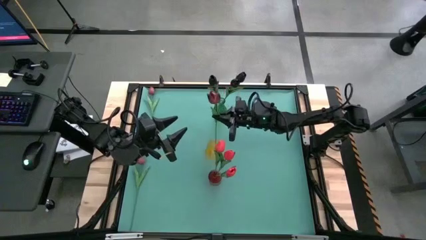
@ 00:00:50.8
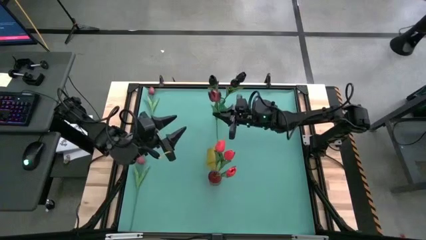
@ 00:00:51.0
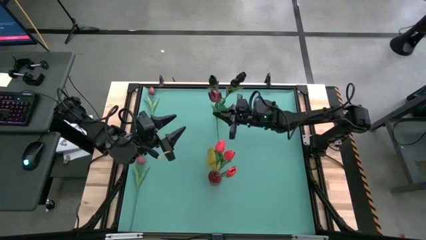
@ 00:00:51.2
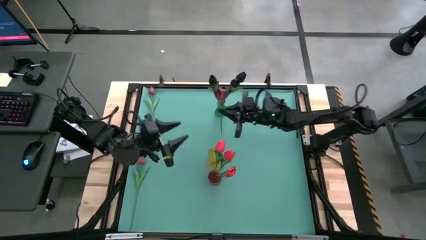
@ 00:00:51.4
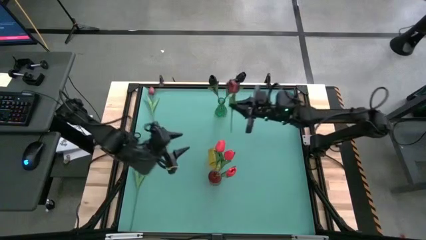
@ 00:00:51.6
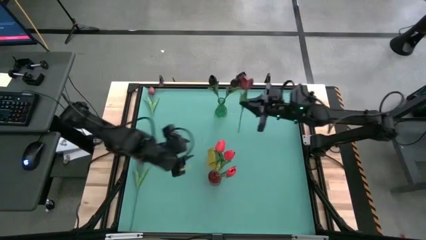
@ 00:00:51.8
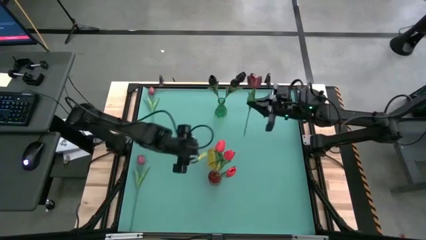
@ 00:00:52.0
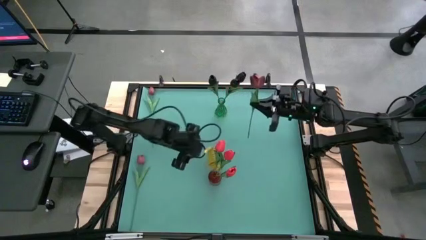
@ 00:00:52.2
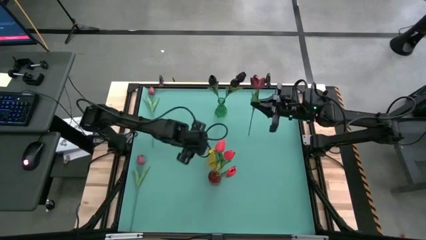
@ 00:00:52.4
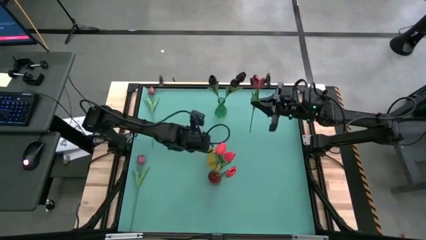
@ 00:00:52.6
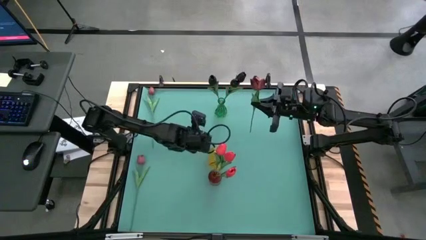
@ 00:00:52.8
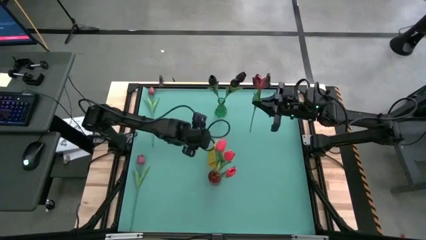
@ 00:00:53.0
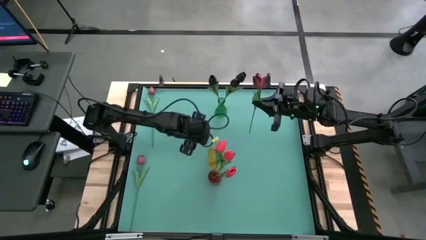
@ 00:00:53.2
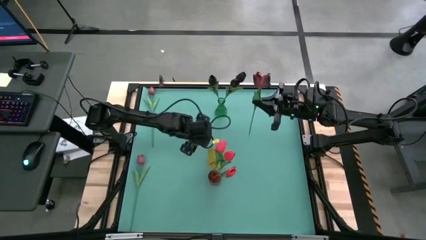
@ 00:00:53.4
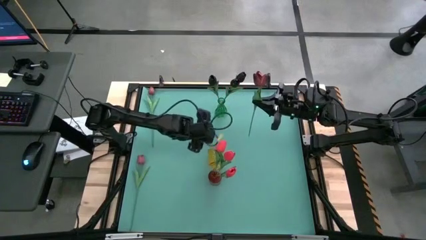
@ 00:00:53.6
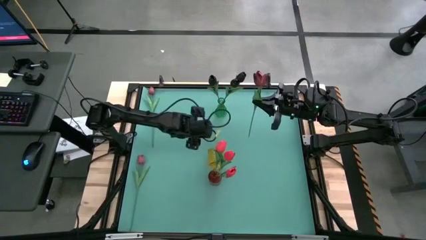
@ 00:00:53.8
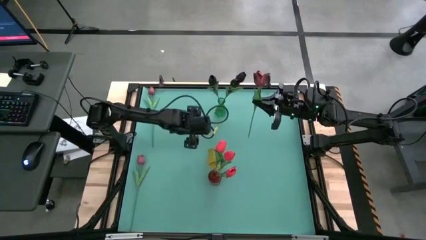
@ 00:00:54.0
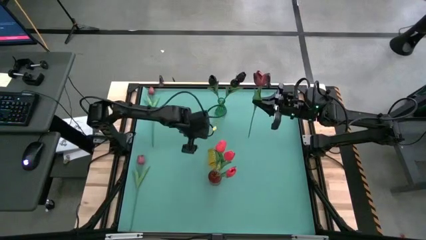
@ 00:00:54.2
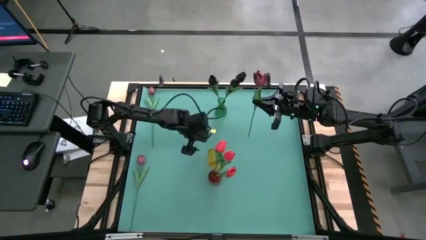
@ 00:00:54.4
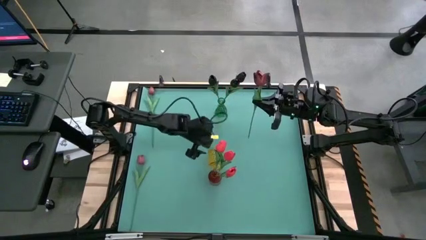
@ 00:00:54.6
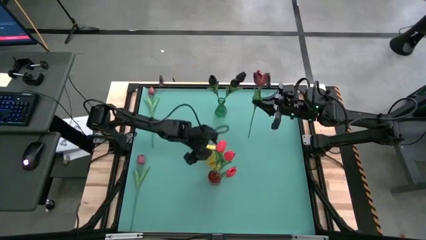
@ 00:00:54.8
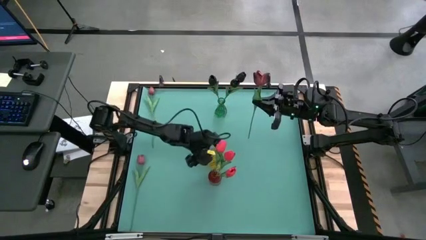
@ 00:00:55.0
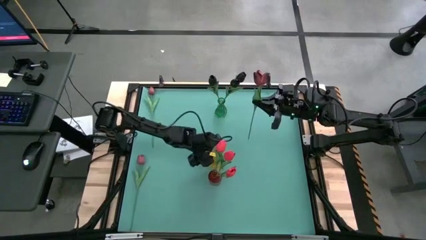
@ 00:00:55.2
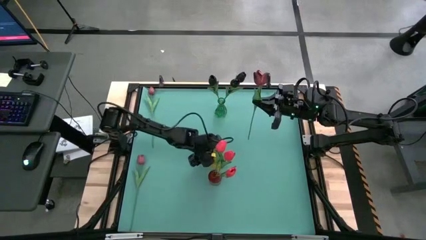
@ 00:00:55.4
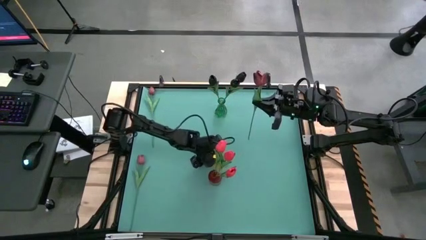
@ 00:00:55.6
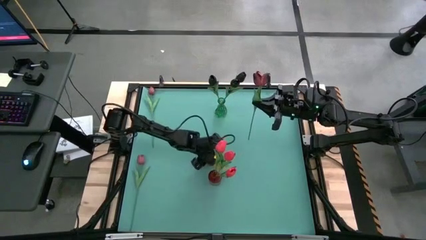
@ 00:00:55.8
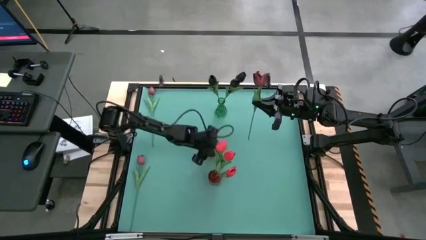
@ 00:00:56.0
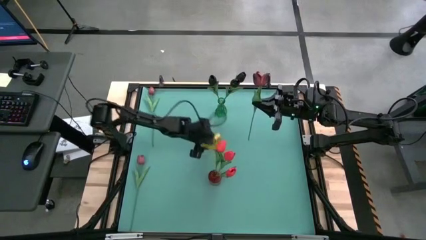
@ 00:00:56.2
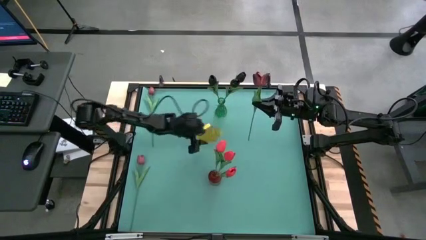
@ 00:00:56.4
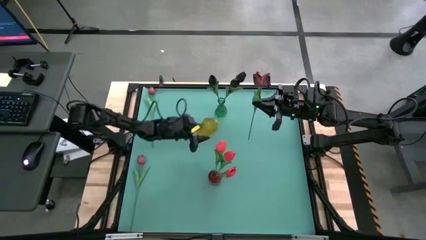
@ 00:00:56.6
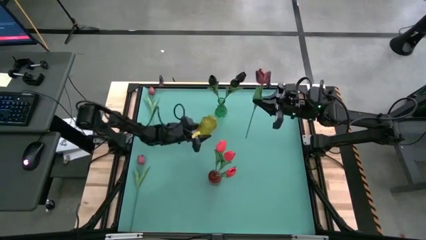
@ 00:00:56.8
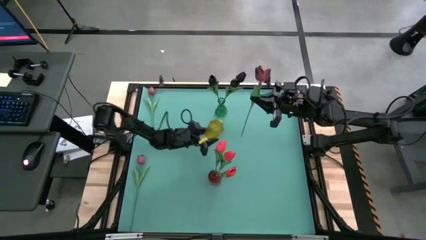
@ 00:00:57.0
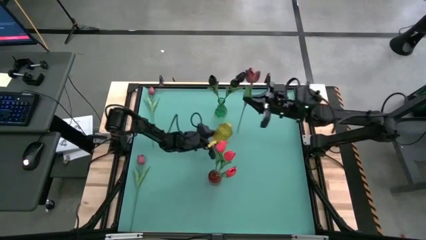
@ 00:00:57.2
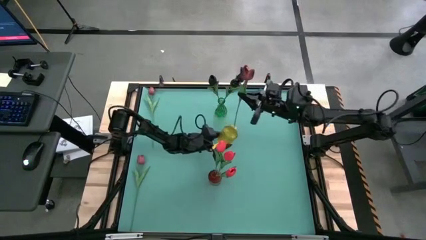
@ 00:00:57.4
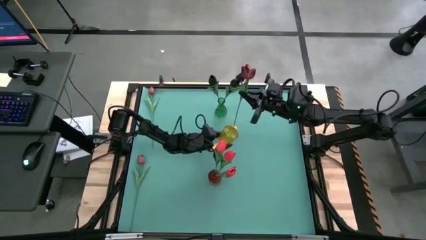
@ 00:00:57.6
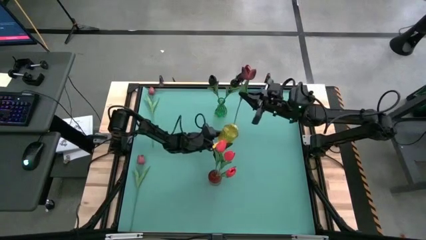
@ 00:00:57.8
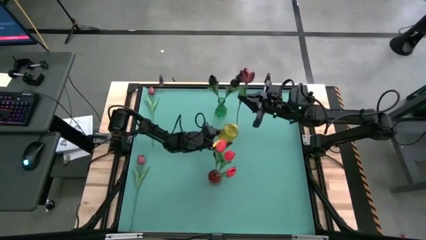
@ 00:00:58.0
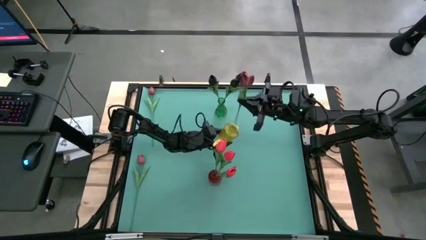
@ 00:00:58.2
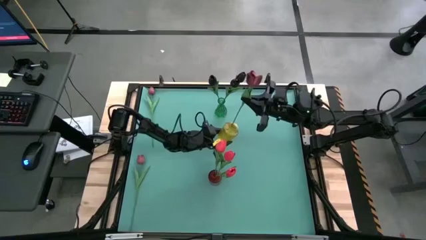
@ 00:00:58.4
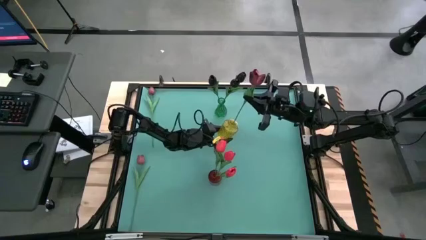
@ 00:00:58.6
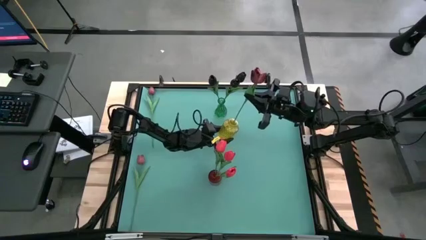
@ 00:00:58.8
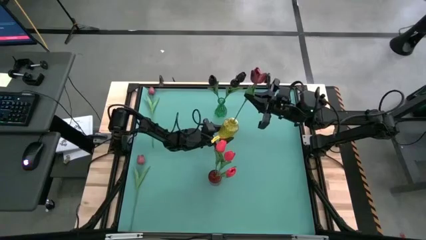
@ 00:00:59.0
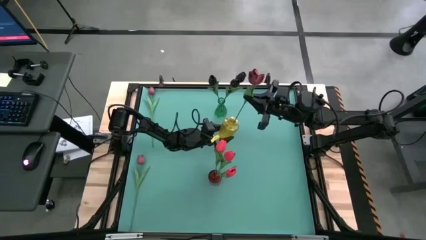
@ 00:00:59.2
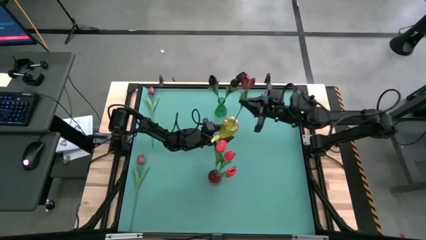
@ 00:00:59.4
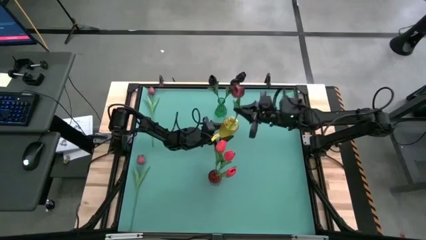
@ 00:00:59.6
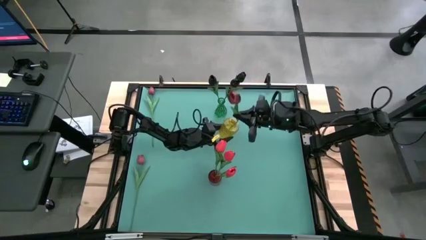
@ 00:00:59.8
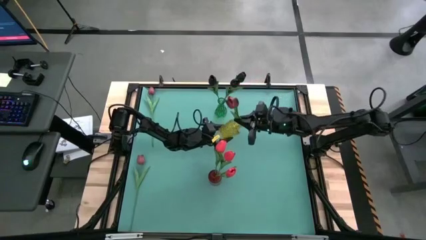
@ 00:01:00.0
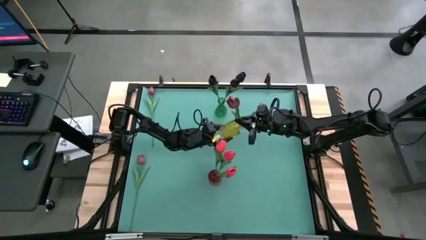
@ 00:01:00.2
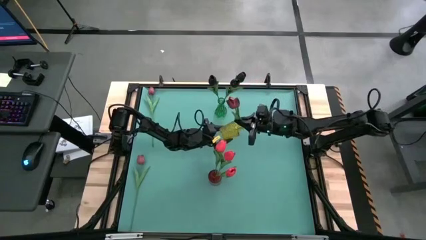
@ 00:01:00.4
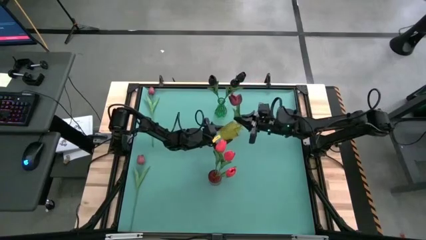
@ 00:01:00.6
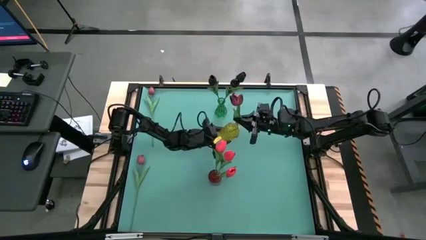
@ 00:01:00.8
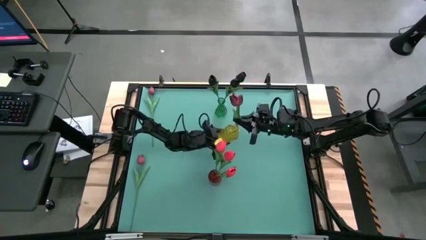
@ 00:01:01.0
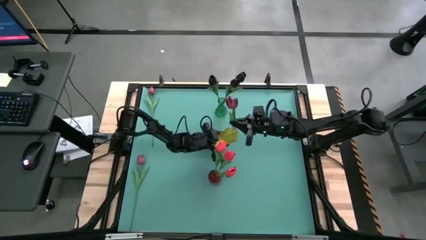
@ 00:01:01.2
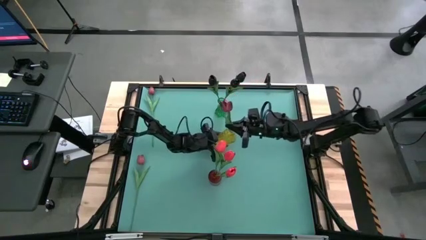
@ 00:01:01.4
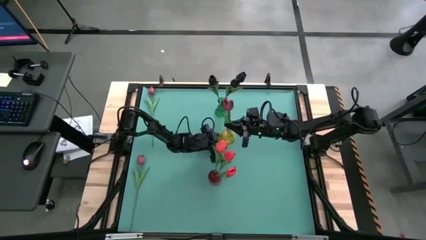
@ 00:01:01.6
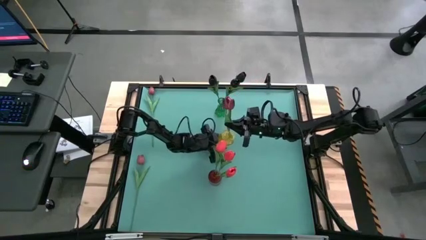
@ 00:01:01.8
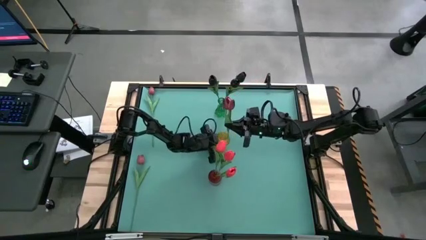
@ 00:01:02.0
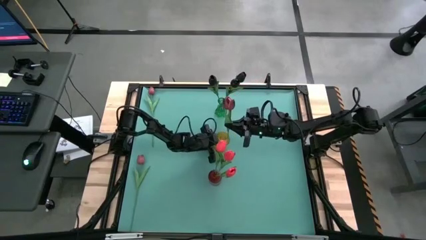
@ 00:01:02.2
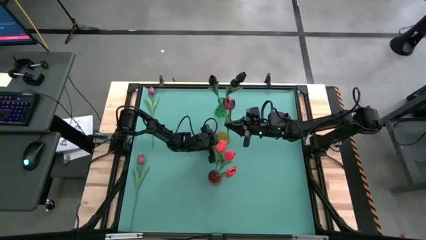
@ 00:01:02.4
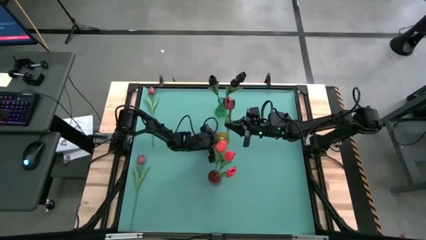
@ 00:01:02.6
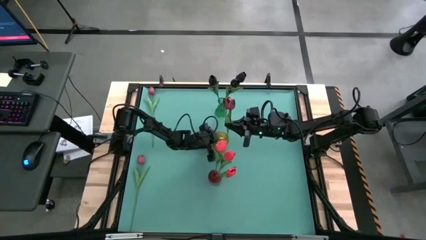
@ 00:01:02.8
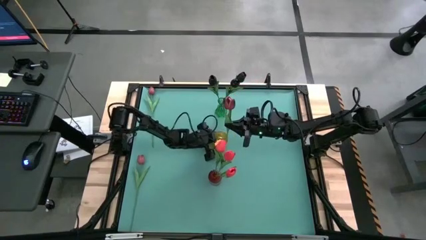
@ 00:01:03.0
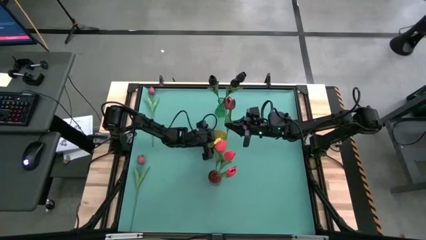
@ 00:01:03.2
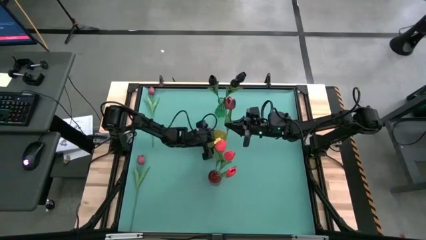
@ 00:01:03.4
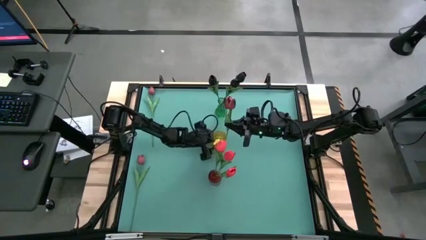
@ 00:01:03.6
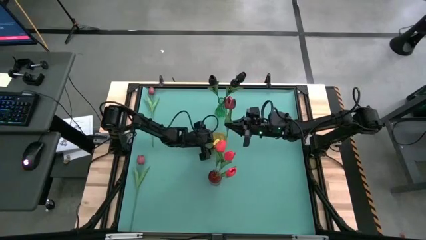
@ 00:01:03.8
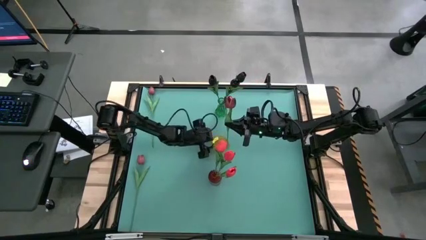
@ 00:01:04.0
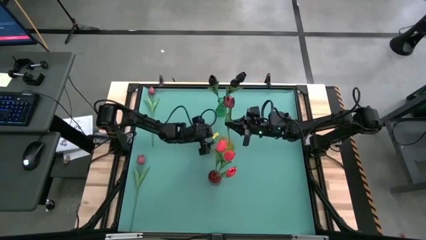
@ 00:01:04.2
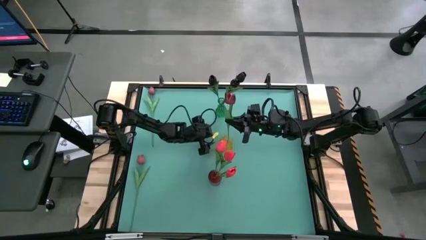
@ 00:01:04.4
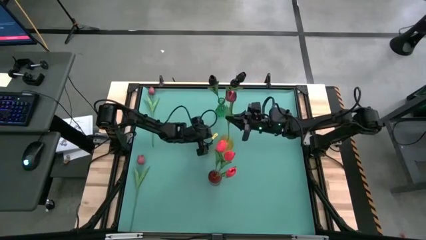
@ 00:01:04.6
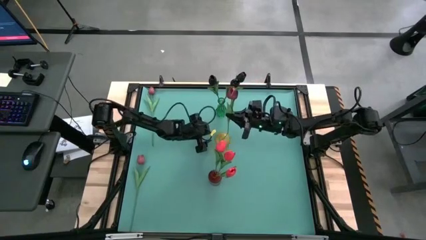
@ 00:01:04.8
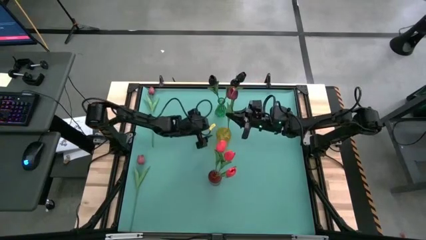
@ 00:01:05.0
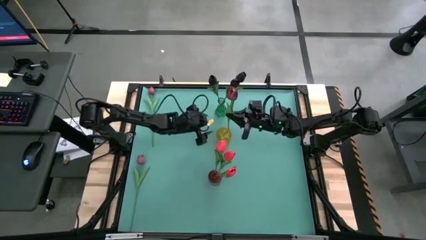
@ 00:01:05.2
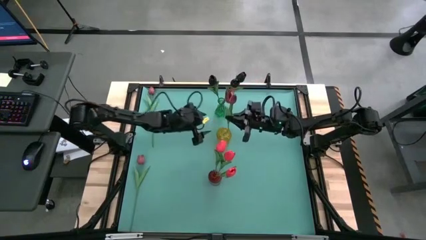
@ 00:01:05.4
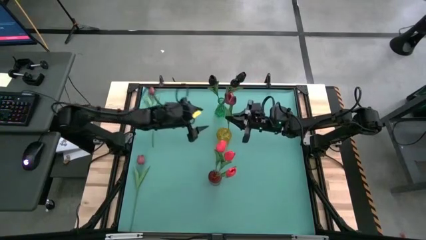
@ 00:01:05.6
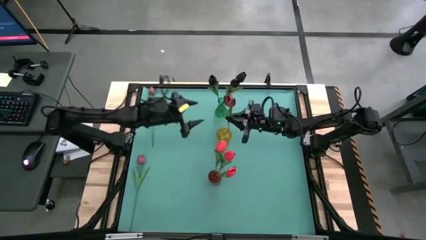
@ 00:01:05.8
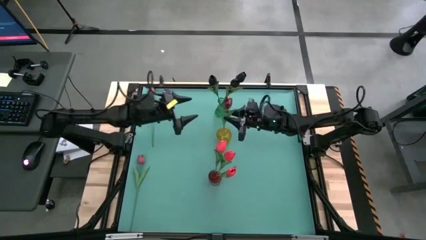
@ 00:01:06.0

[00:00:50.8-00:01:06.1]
Task: Sort flowers into vase by color
Put the top right red tulip into the yellow vase
